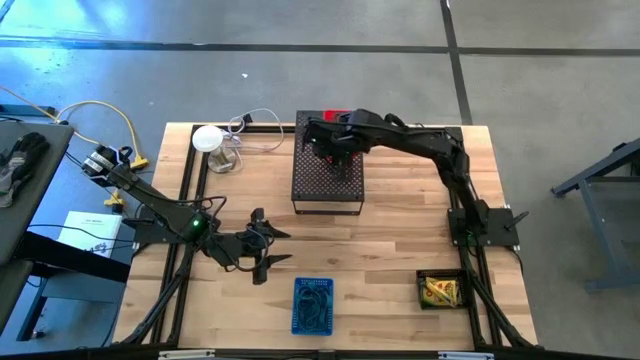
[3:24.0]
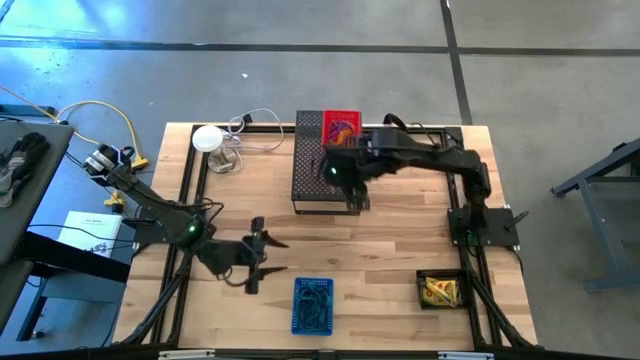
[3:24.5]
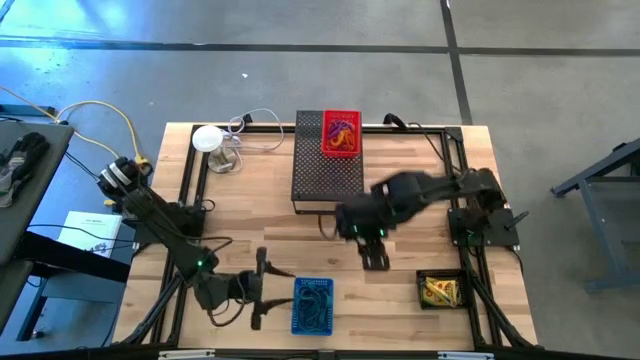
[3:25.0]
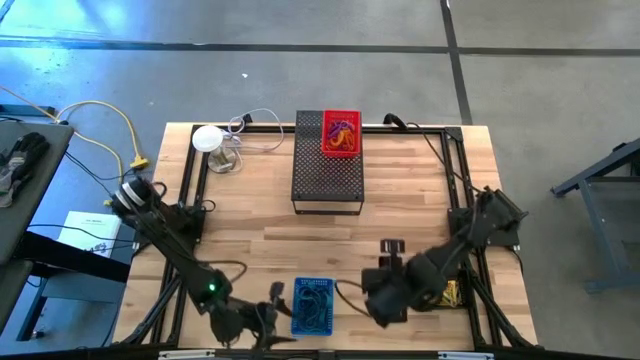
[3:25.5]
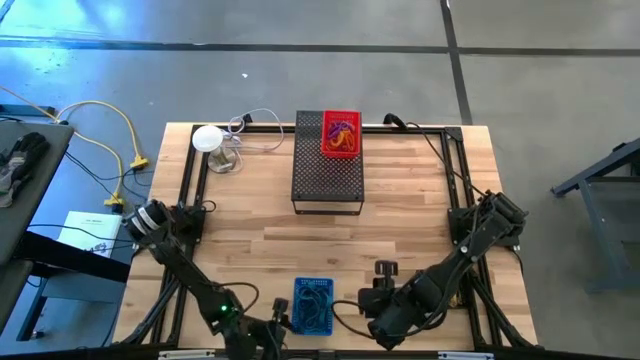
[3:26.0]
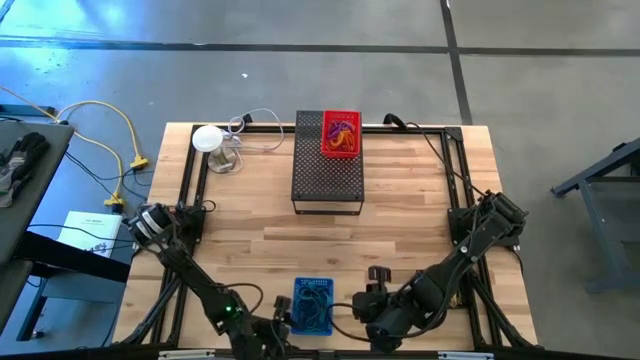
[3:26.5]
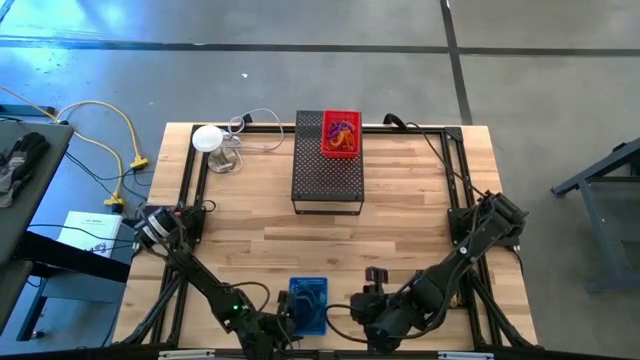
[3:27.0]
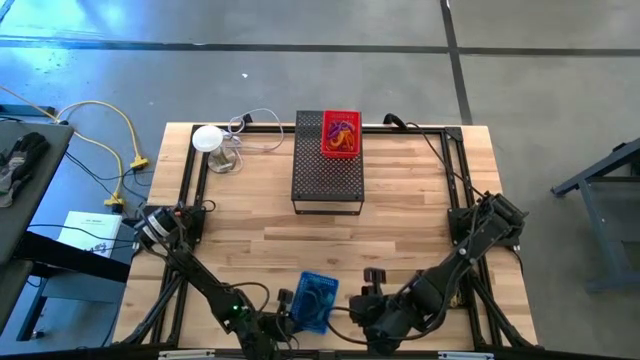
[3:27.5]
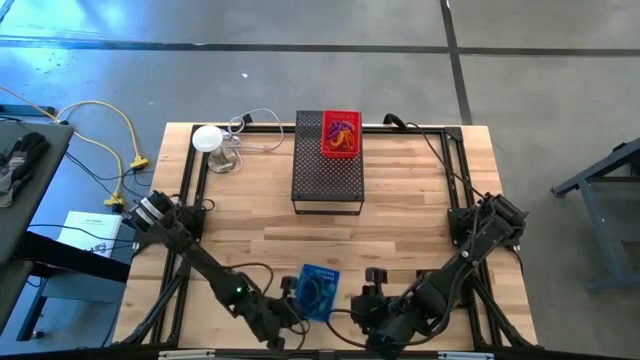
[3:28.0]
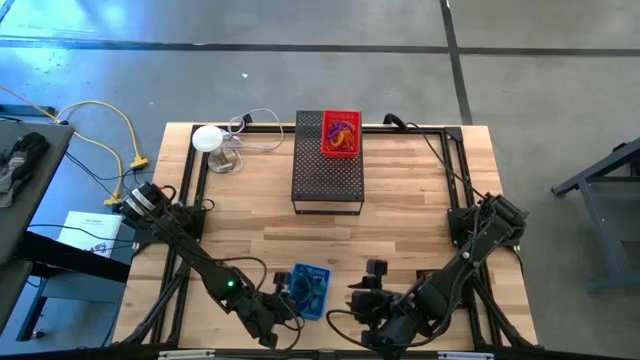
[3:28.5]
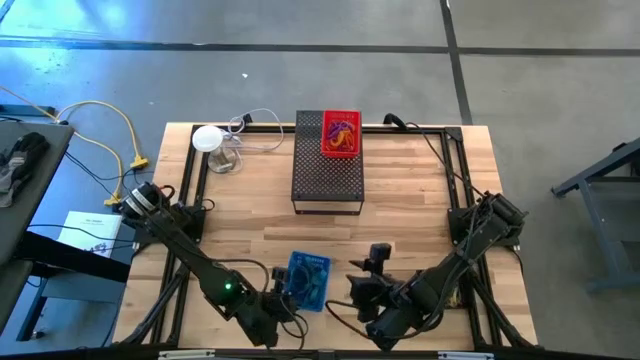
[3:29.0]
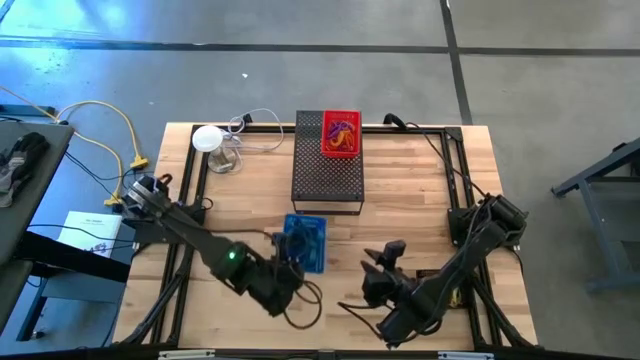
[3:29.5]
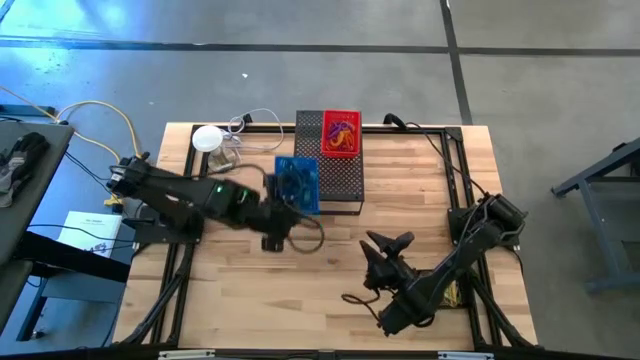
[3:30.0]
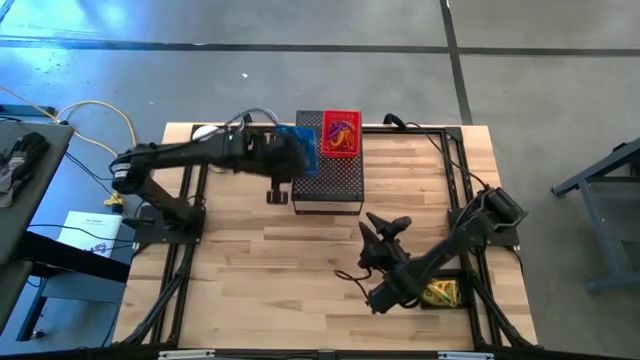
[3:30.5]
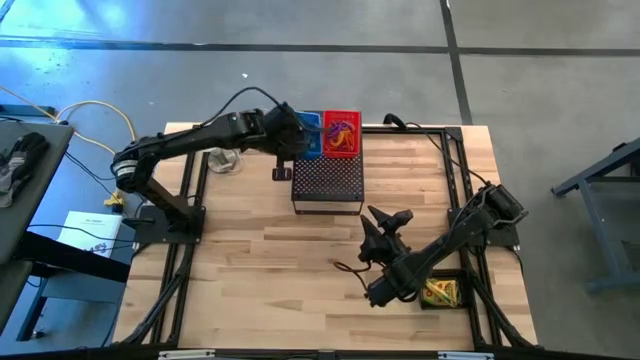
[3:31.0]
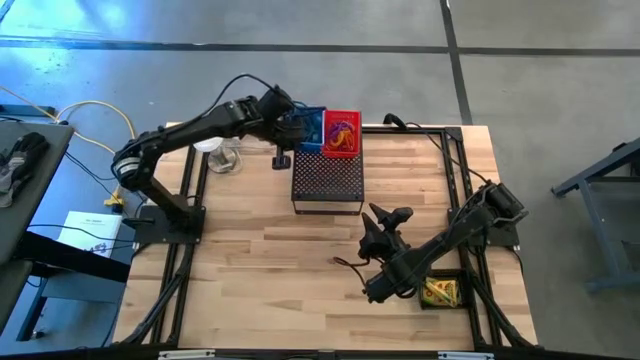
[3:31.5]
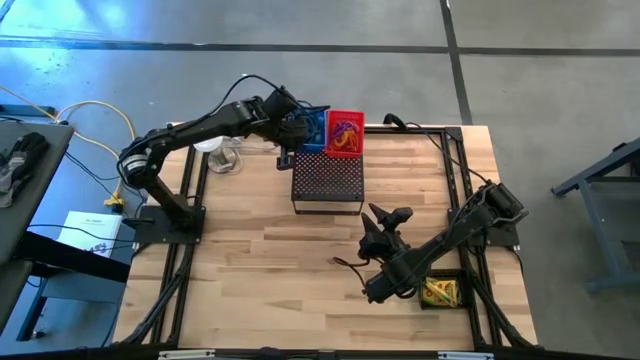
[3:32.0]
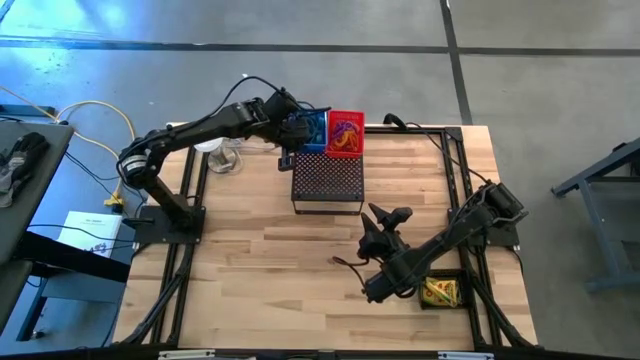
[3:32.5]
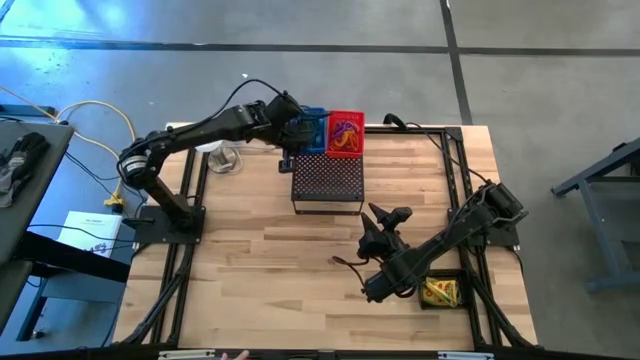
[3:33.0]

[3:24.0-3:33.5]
Task: Pick & Place Office Desk Supplies
Put the blue bin with rubber bands on the shelf

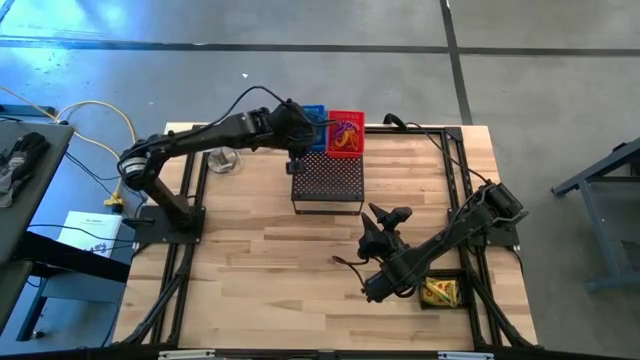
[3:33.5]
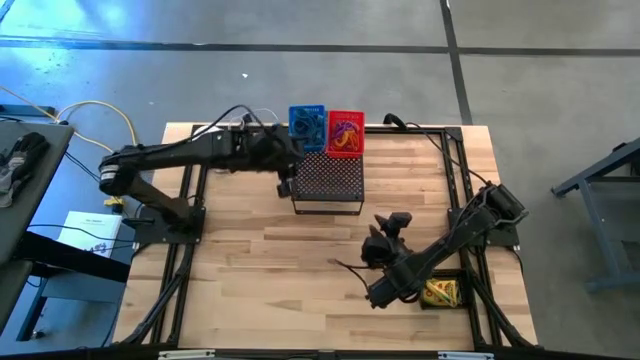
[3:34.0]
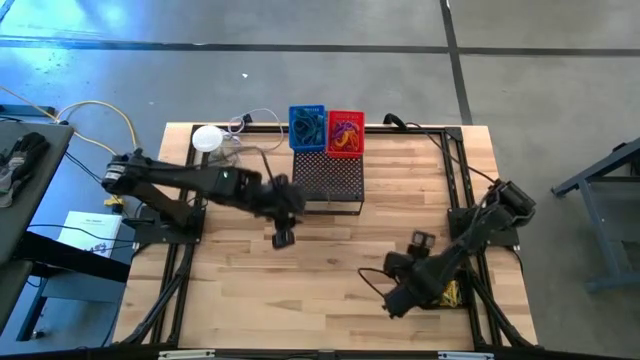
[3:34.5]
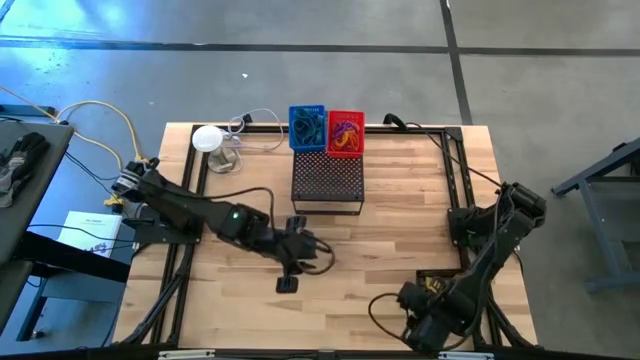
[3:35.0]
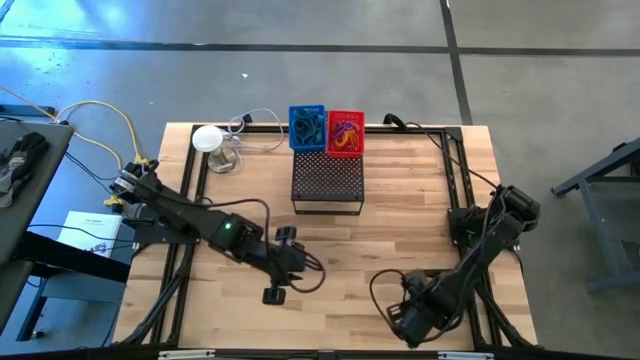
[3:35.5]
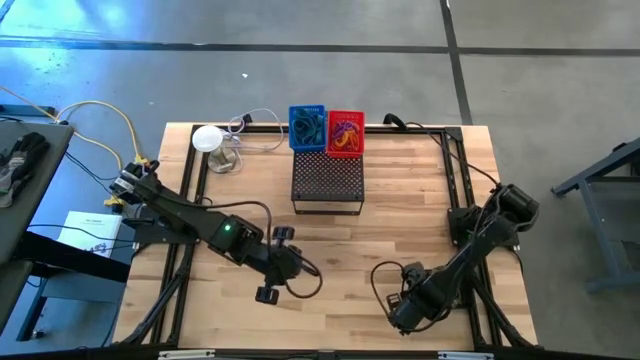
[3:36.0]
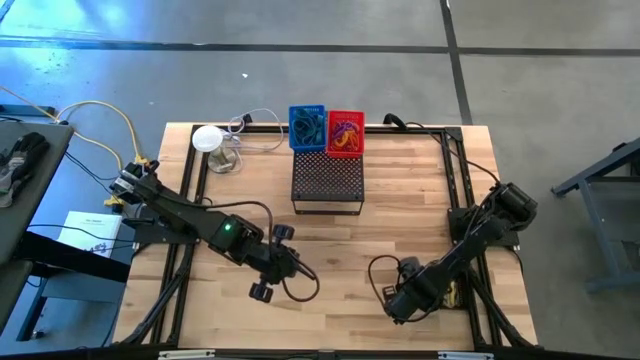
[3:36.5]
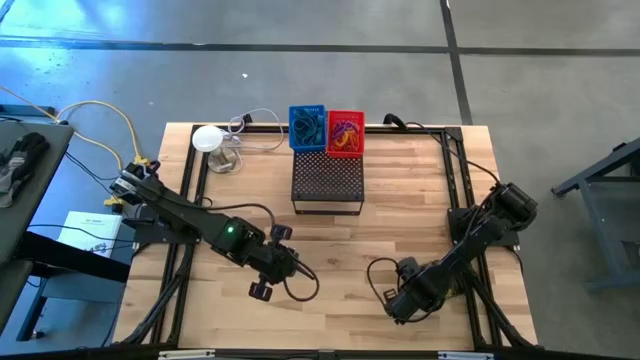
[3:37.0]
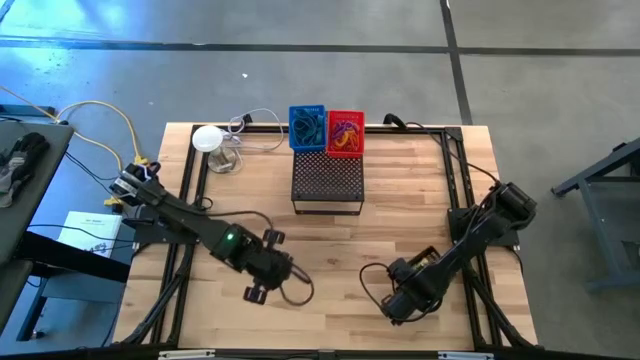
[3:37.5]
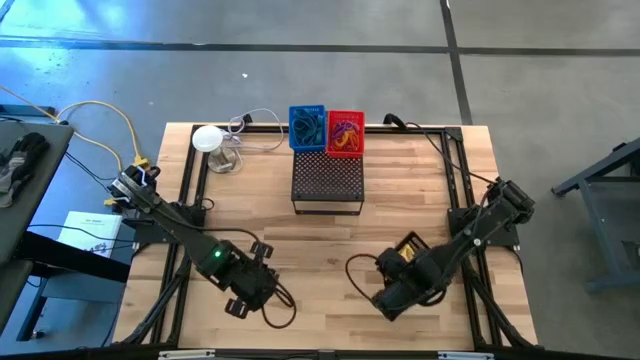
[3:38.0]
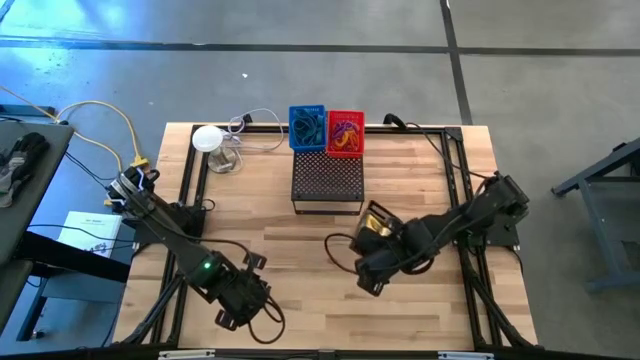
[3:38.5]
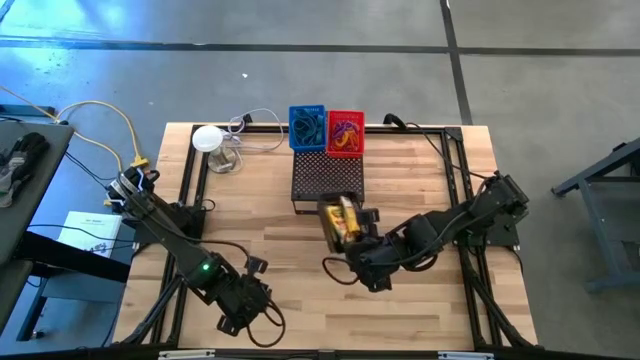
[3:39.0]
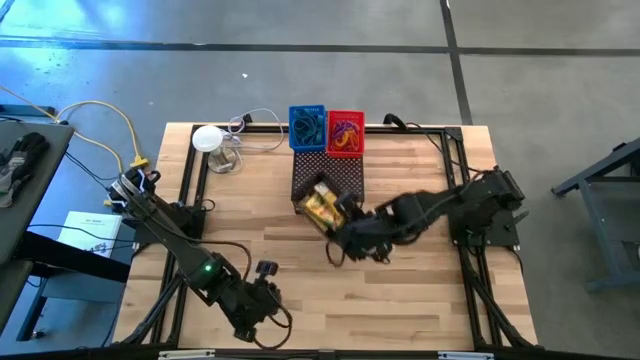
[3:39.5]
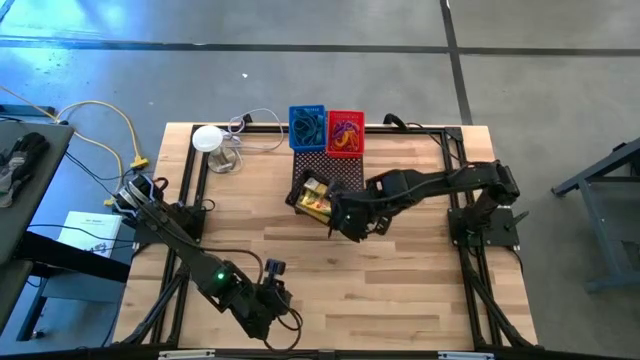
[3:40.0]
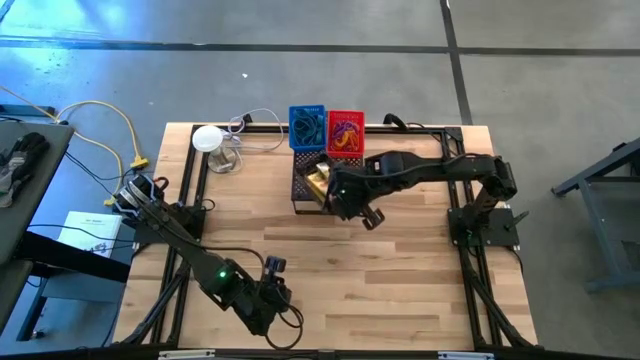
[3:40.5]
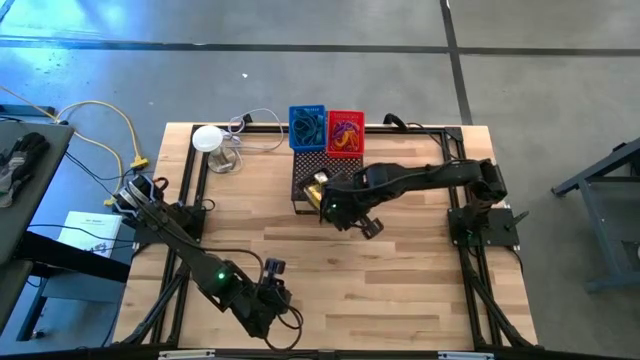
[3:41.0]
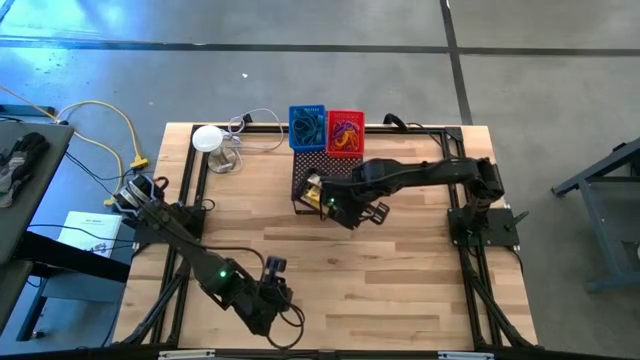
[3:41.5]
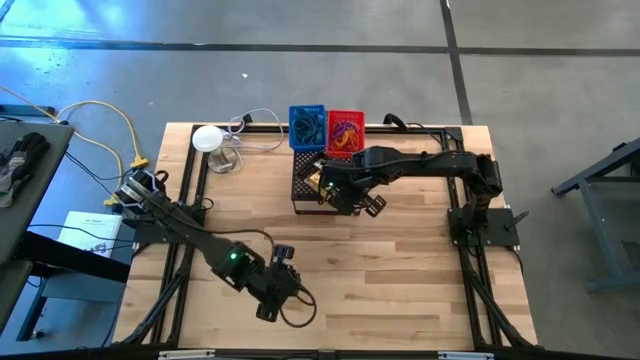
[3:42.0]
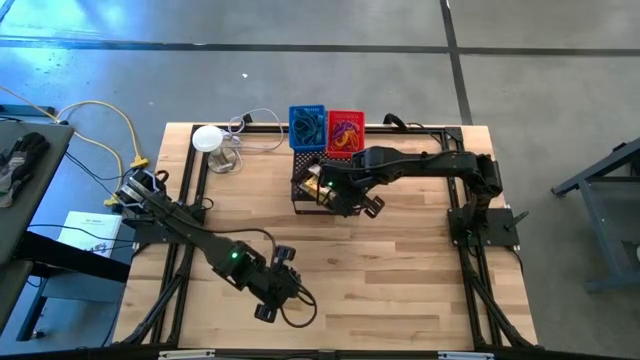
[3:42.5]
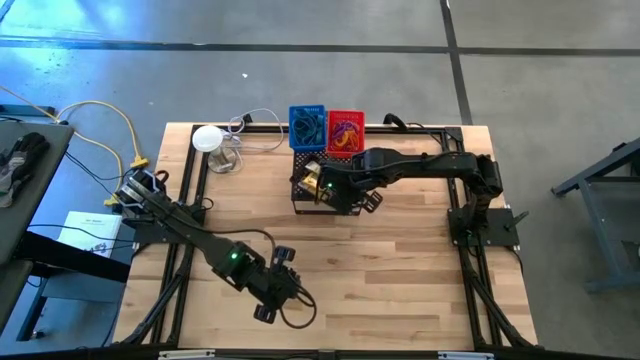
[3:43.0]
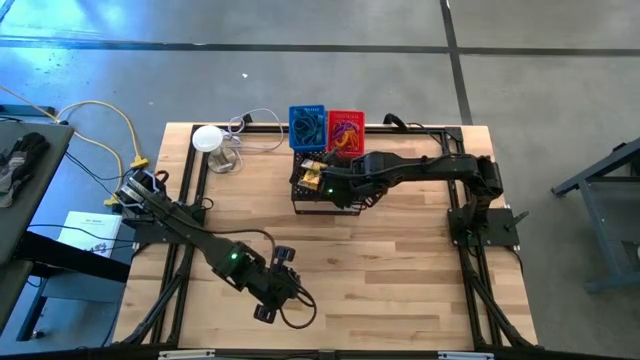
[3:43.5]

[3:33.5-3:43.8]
Put the black bin with crayon boxes on the shelf

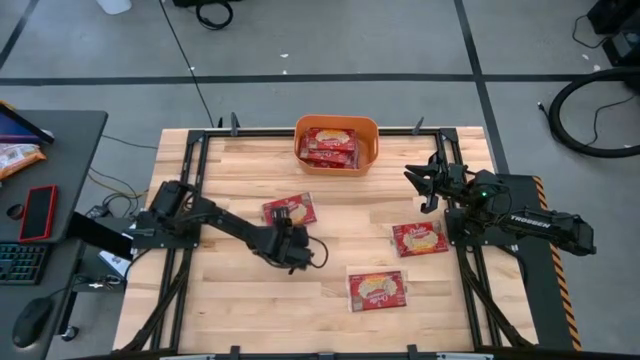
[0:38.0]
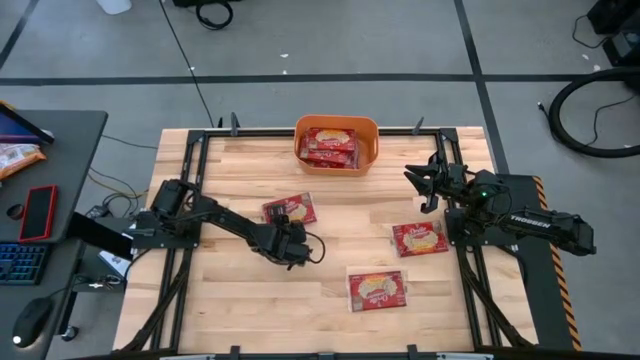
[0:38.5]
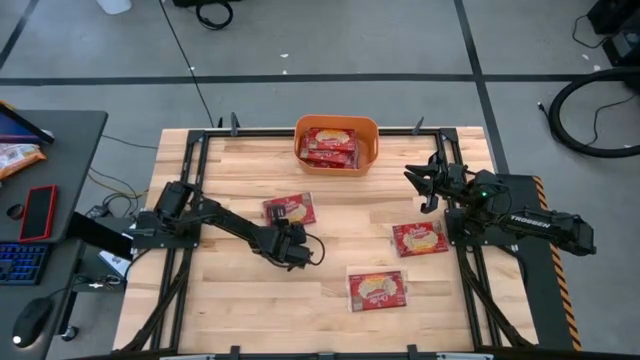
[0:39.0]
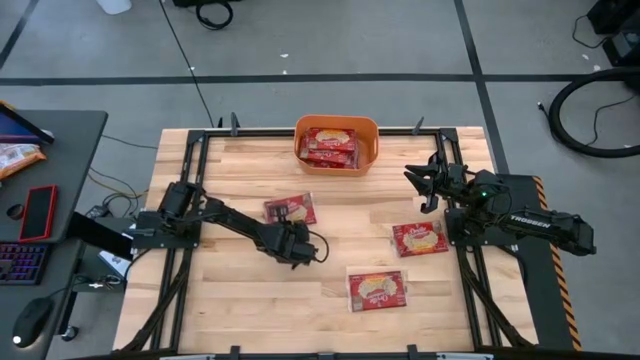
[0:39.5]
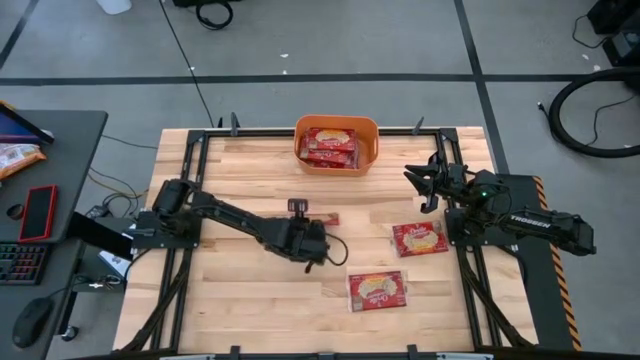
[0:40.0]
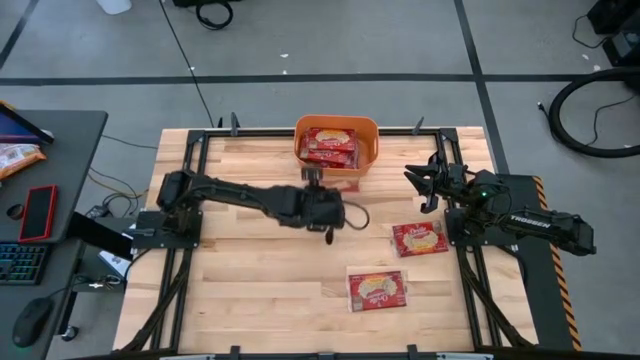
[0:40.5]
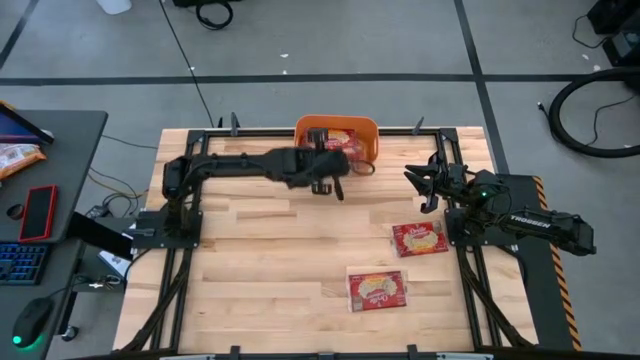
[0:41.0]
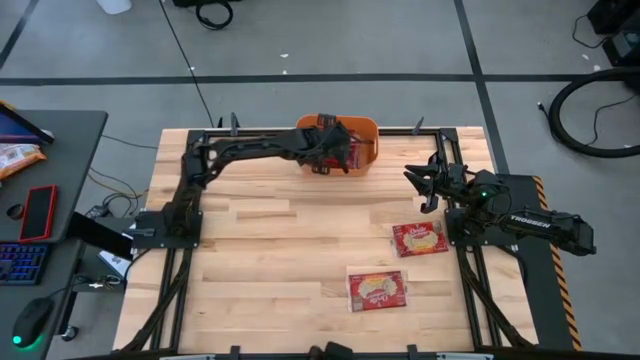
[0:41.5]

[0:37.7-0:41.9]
Task: Sort popcorn bags into baskets
Put the red popcorn bag into the orange bin
